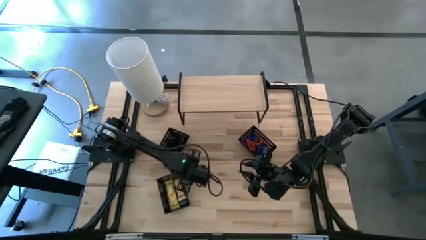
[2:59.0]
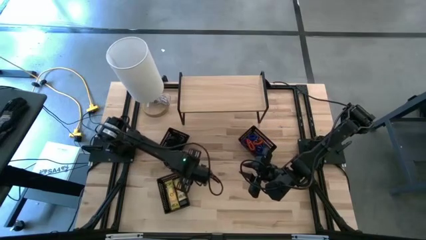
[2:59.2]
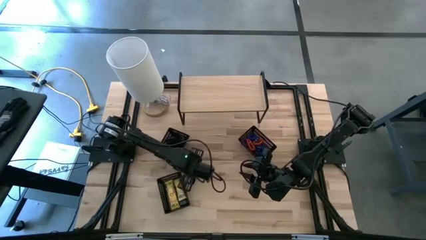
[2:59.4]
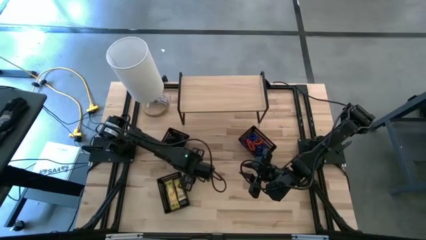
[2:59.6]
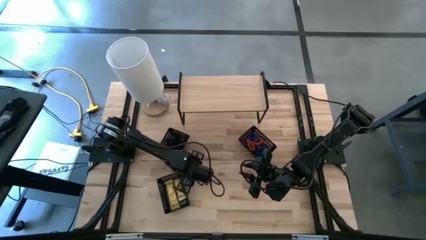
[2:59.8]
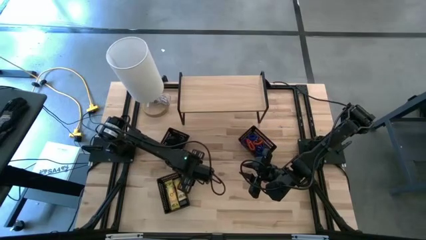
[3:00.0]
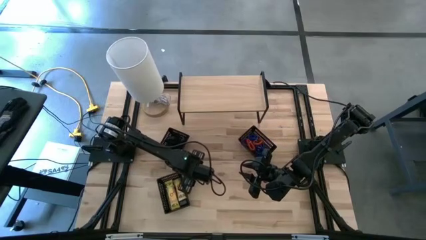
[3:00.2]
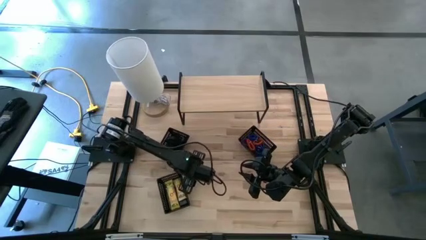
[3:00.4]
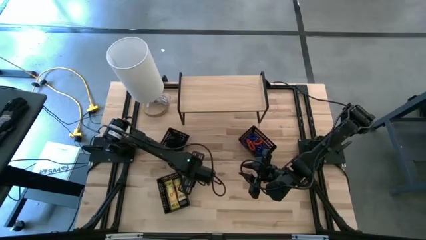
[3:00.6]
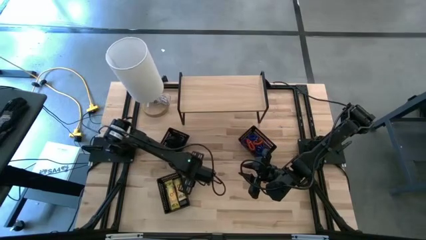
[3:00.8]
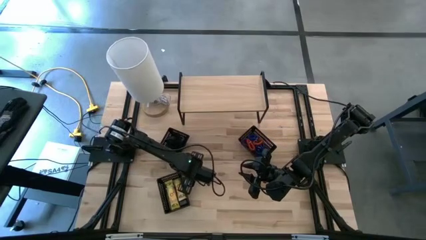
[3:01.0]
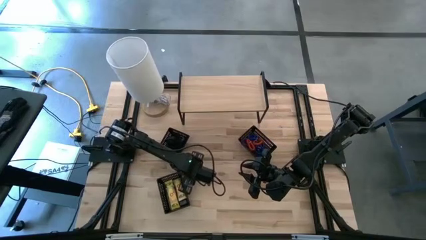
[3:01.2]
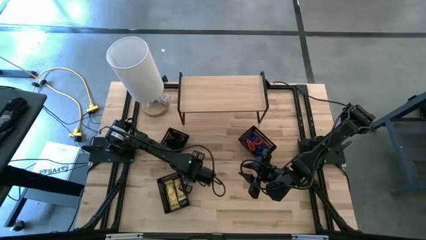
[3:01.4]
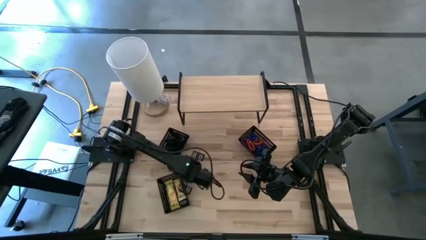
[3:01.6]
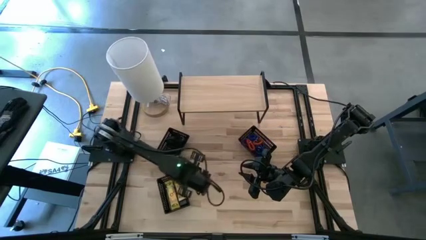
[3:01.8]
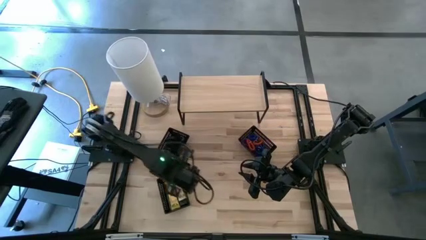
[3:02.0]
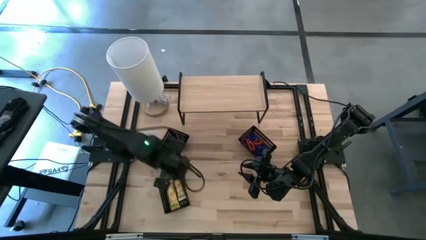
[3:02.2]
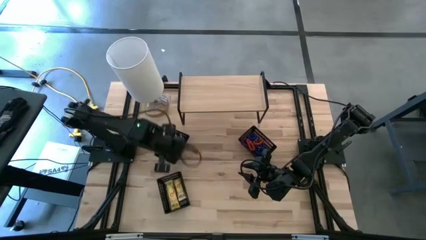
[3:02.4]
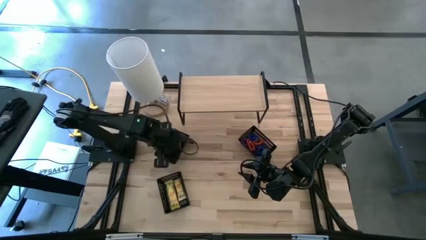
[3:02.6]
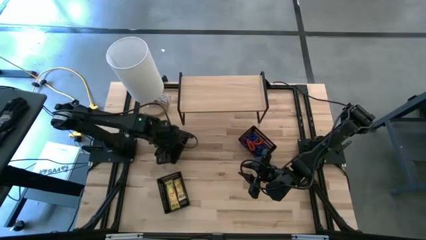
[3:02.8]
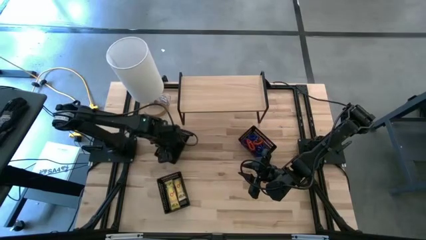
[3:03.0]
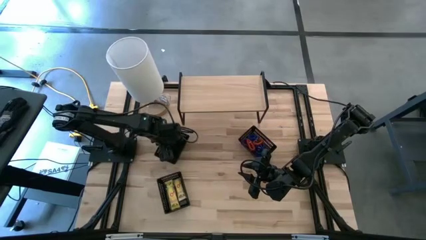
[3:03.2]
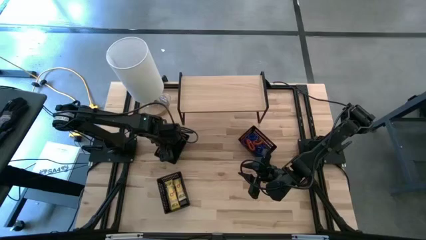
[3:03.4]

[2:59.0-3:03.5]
Task: Pick & Place Office Desk Supplies
Put the black rubber band into the top left black bin

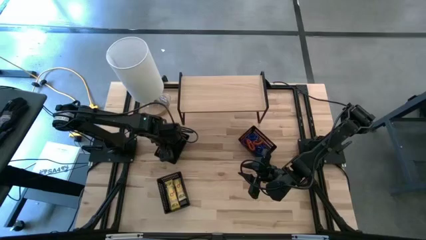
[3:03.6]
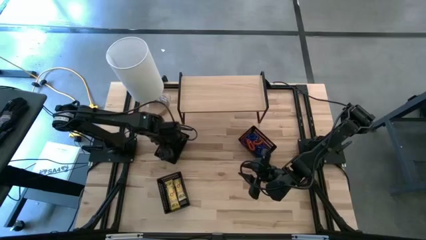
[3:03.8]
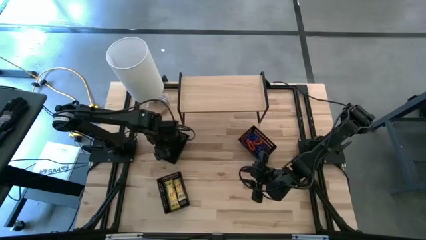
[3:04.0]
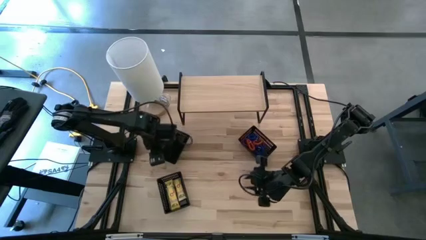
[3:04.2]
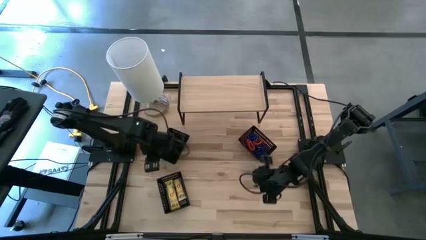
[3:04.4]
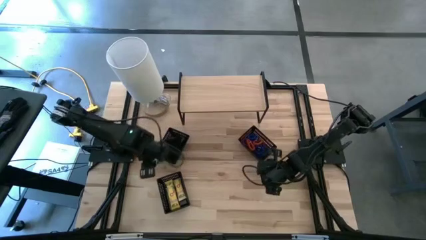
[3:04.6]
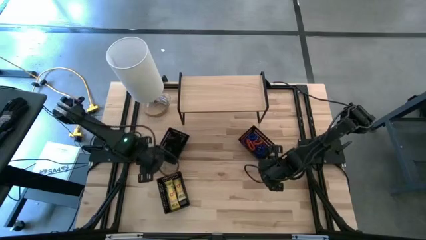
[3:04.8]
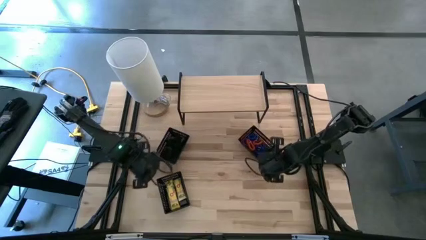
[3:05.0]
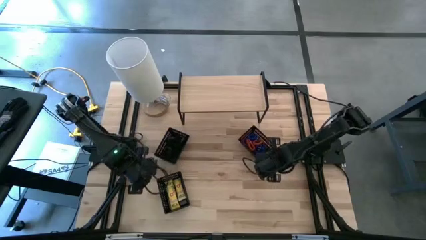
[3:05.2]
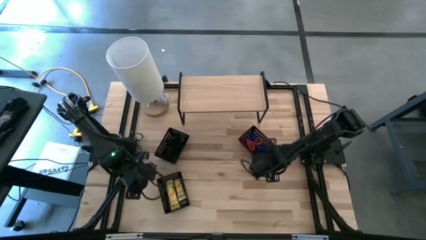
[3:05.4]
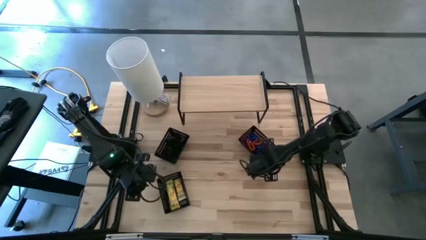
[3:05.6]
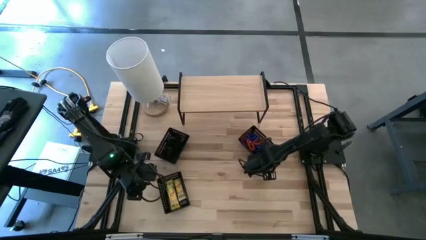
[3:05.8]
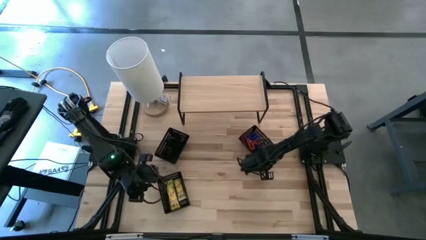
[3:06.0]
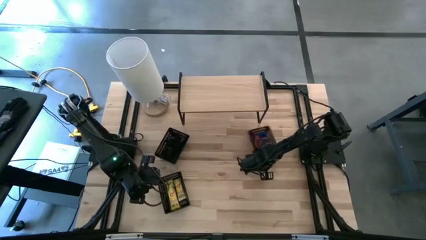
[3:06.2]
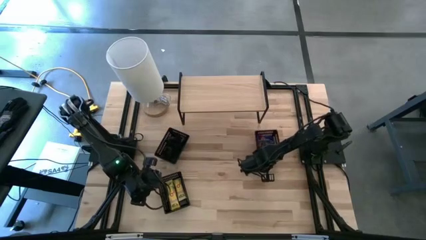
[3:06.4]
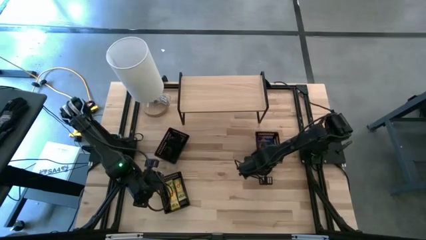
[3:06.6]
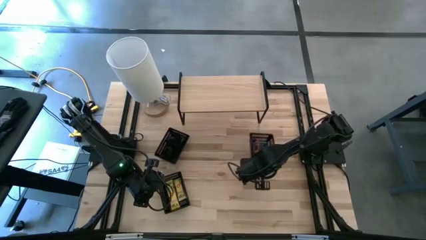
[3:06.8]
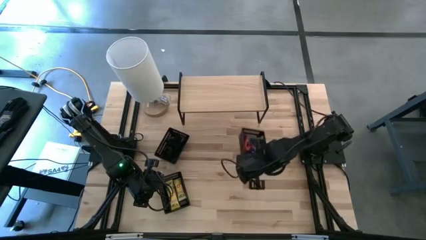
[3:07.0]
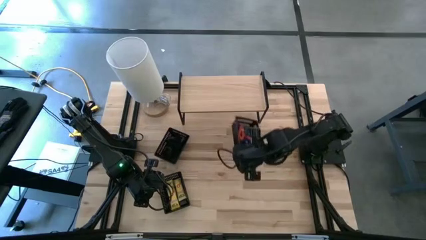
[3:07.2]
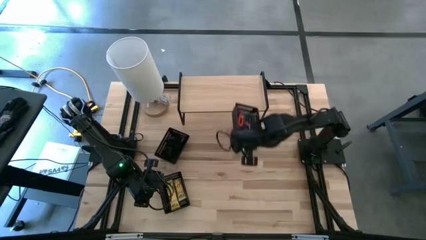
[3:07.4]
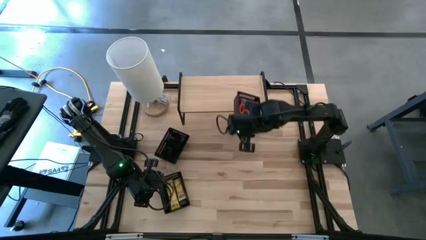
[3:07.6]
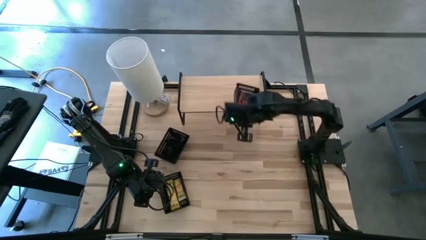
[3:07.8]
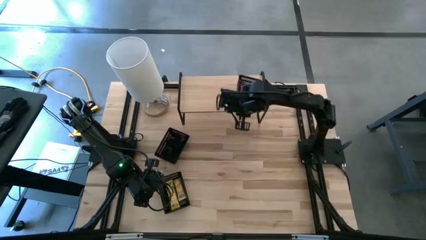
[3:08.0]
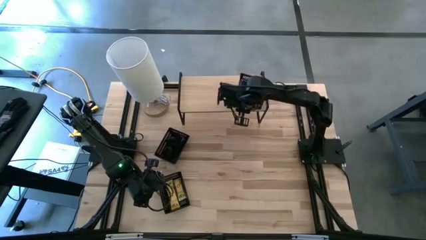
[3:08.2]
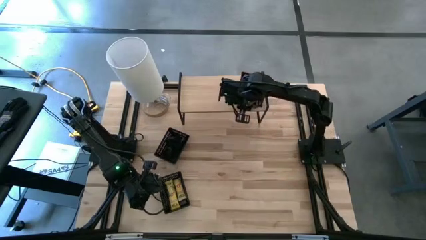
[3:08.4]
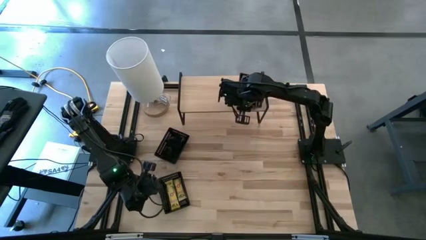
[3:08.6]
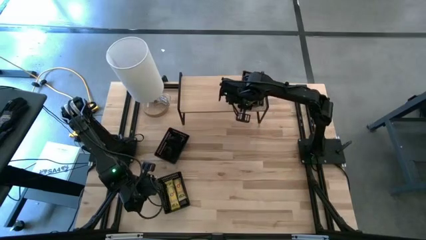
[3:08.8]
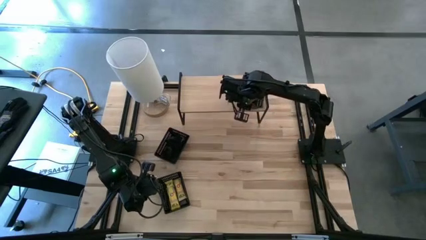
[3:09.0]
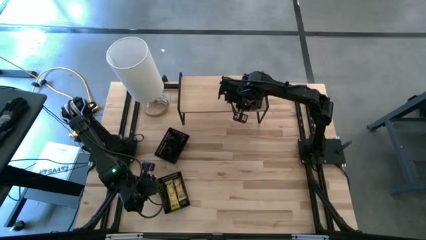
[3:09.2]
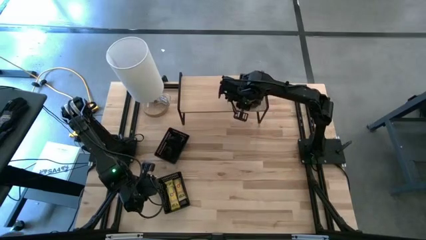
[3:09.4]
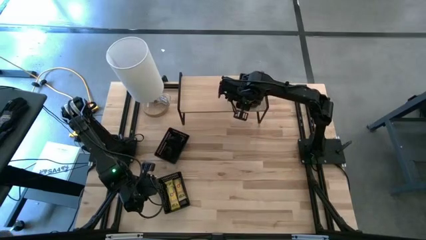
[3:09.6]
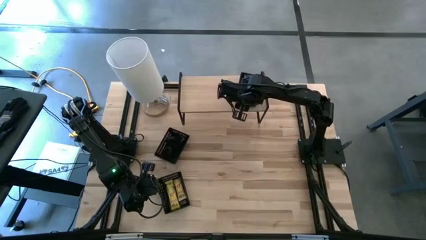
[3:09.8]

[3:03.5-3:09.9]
Put the top right black bin with spring keychains on the shelf

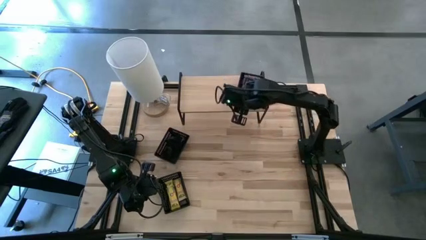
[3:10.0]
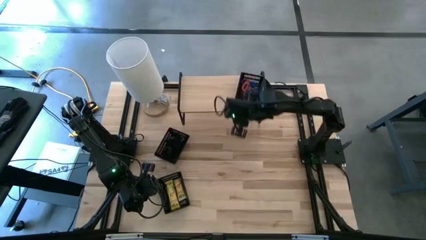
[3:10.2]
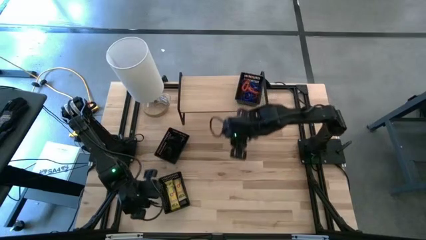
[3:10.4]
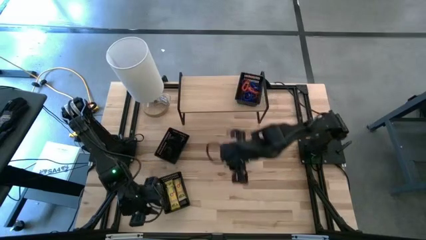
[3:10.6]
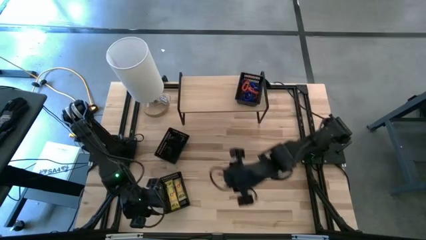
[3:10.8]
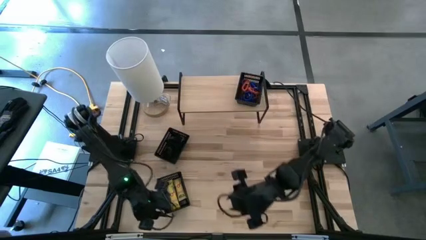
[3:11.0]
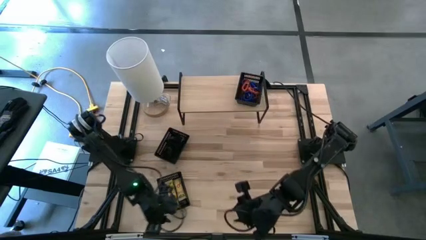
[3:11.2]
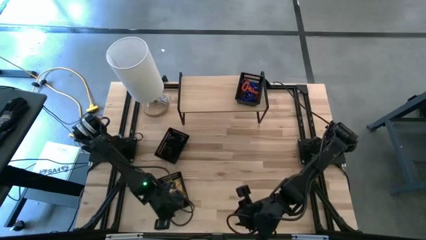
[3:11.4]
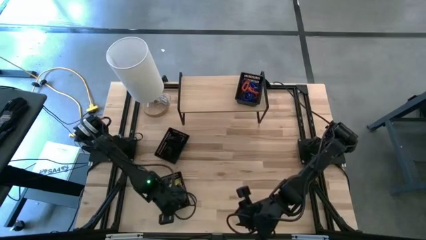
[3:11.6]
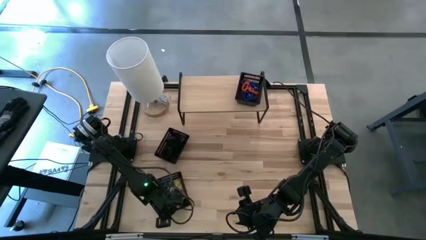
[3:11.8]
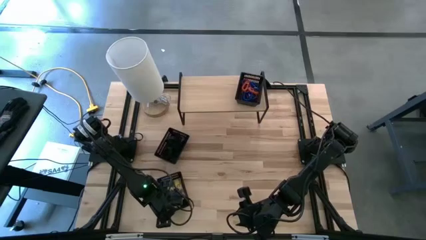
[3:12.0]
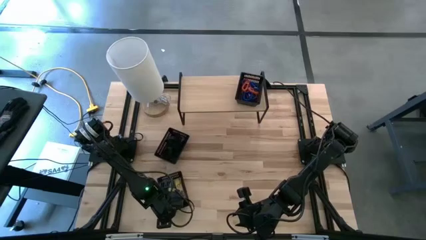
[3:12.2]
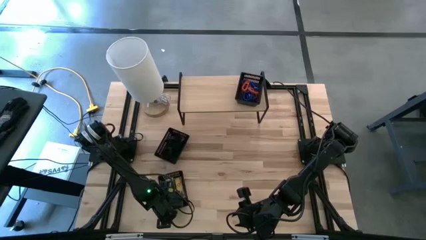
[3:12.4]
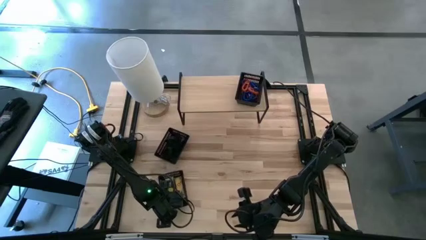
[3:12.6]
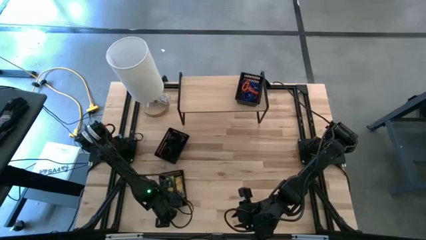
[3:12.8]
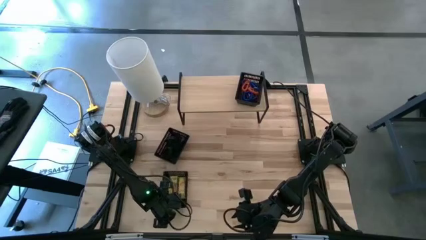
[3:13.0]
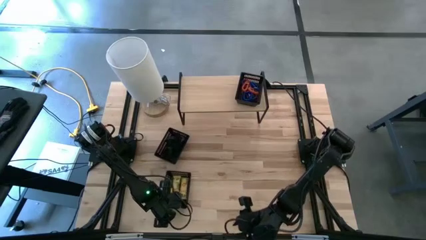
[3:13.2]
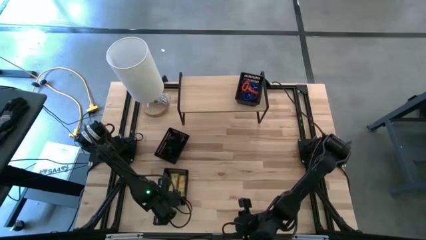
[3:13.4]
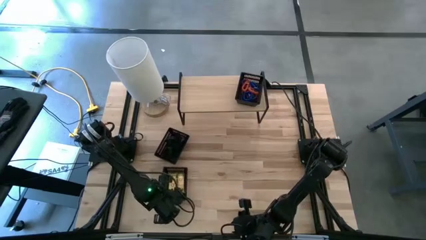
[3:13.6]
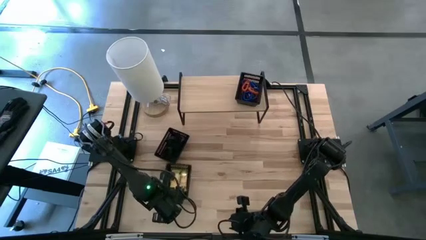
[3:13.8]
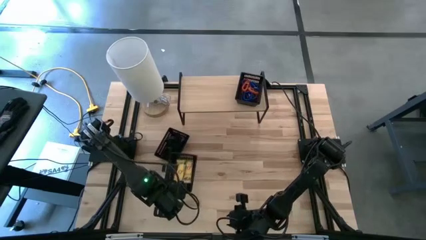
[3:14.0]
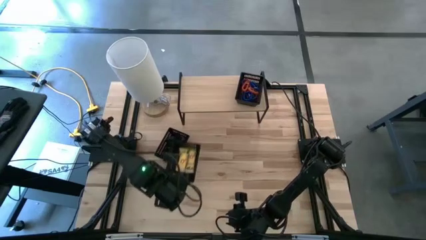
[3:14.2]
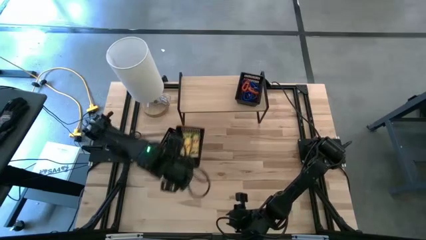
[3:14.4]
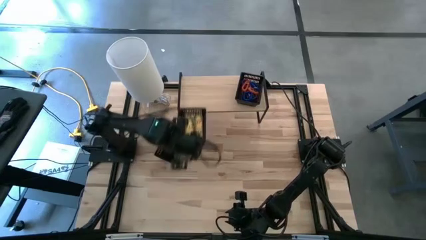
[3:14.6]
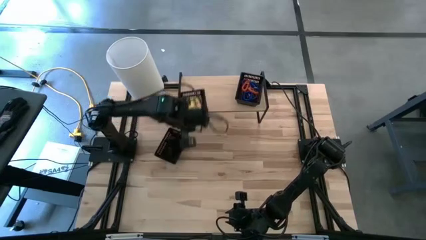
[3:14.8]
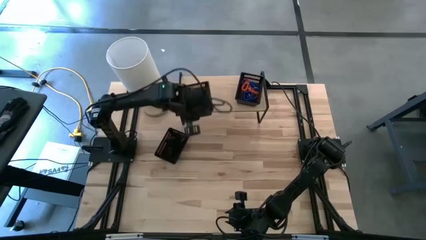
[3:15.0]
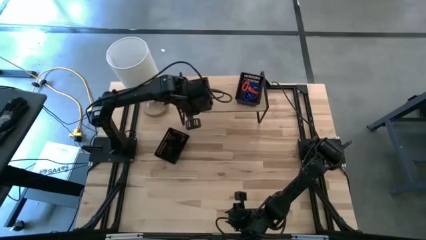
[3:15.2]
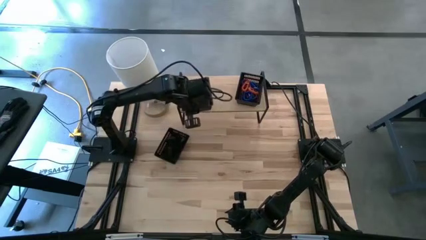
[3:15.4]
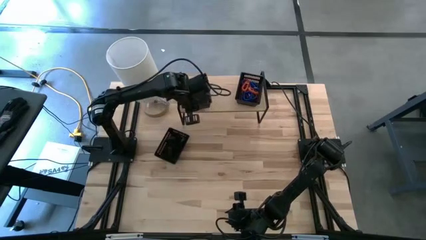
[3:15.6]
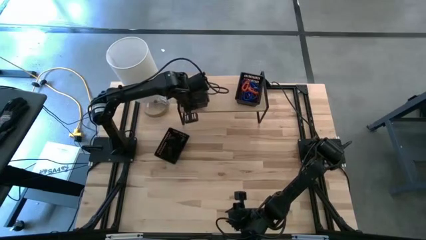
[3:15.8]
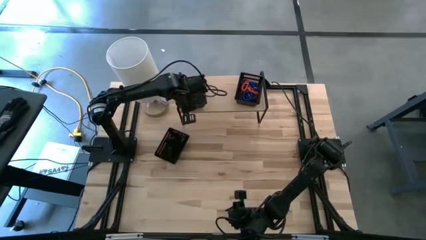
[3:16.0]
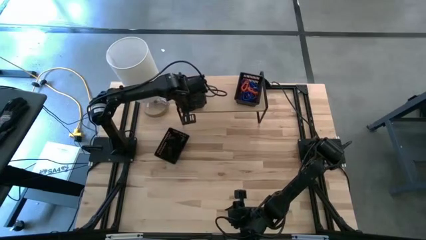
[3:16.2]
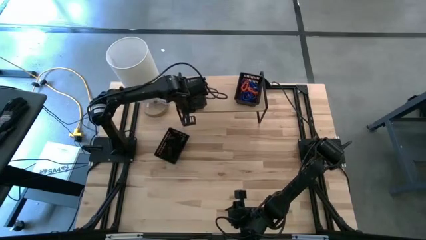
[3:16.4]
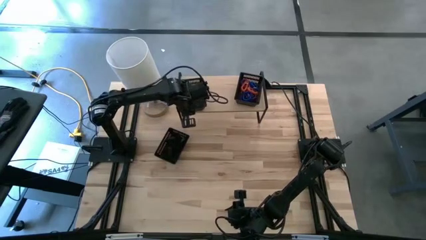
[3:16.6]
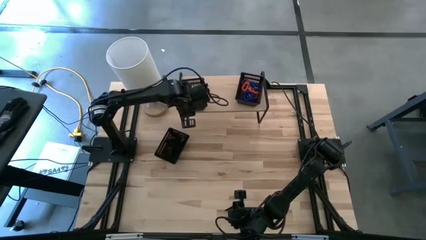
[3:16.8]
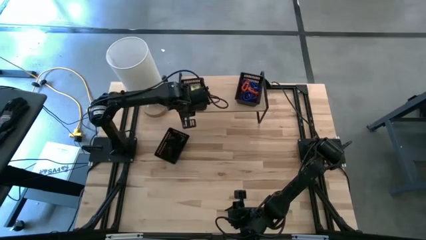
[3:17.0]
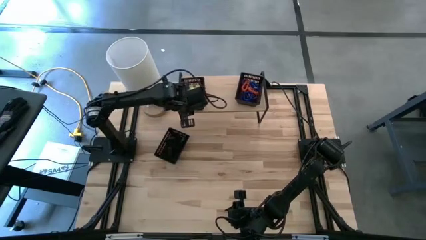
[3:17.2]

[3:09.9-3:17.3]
Put the bottom black bin with crayon boxes on the shelf
